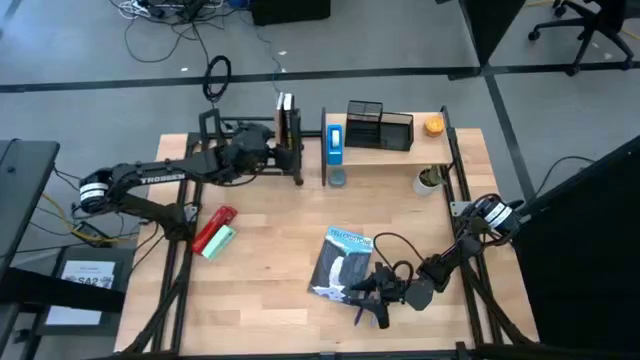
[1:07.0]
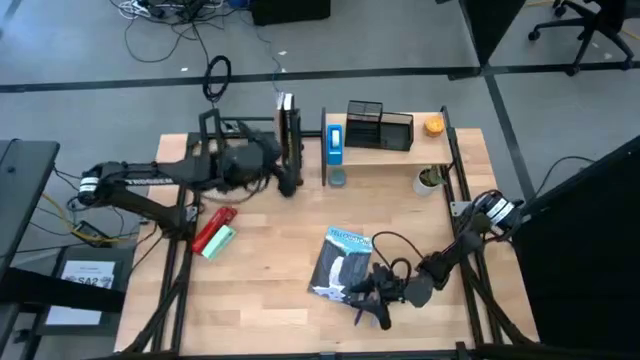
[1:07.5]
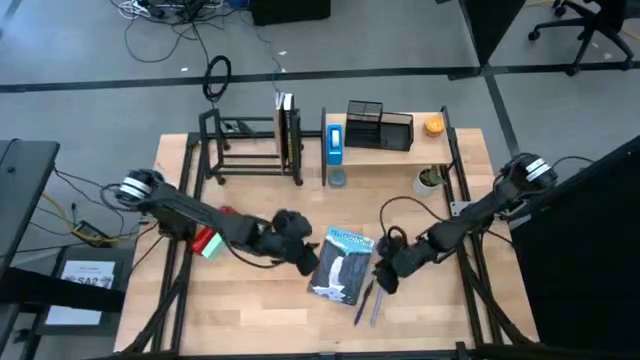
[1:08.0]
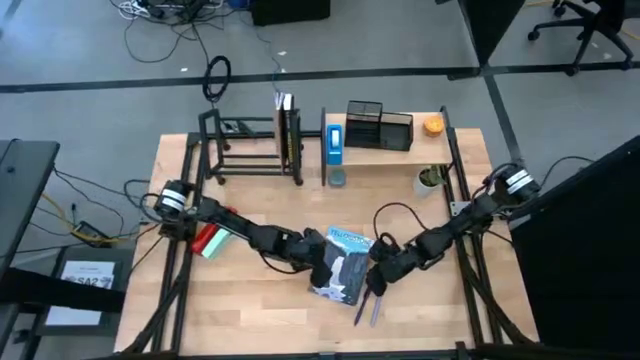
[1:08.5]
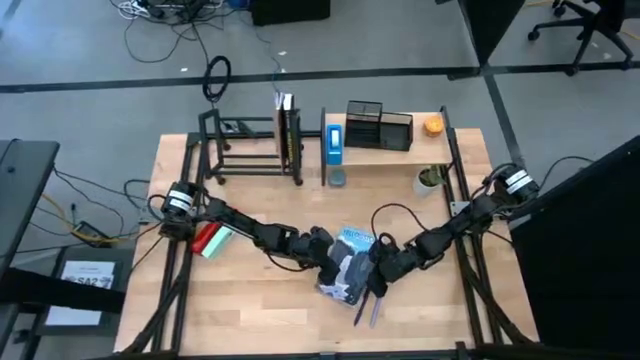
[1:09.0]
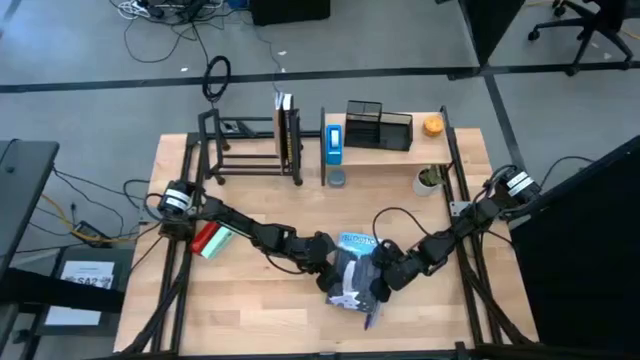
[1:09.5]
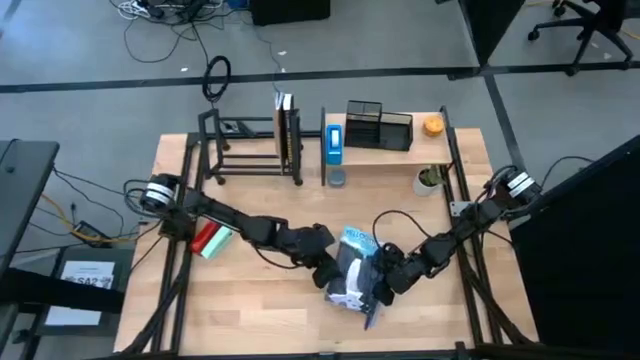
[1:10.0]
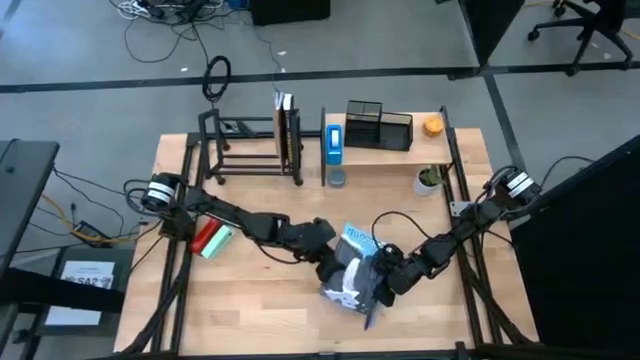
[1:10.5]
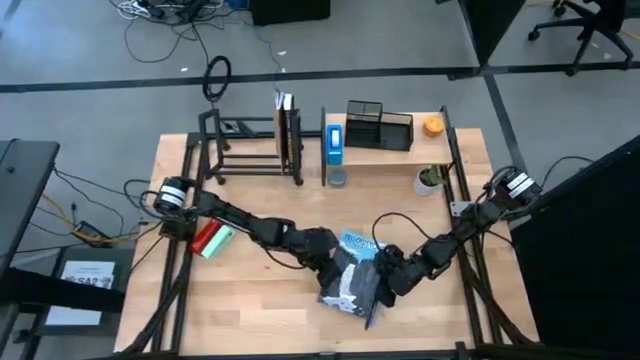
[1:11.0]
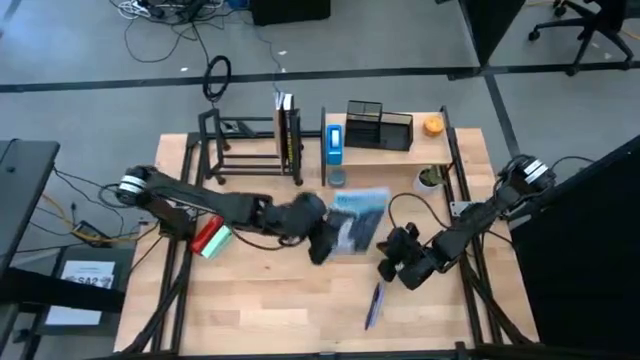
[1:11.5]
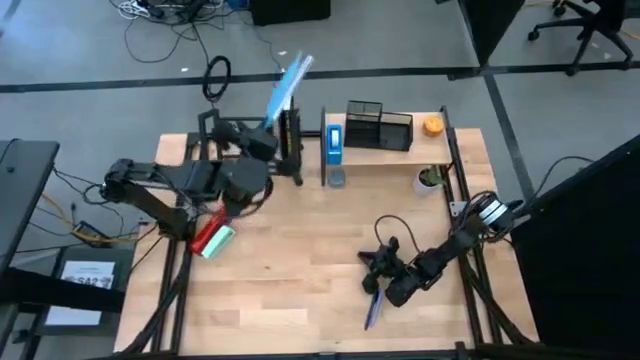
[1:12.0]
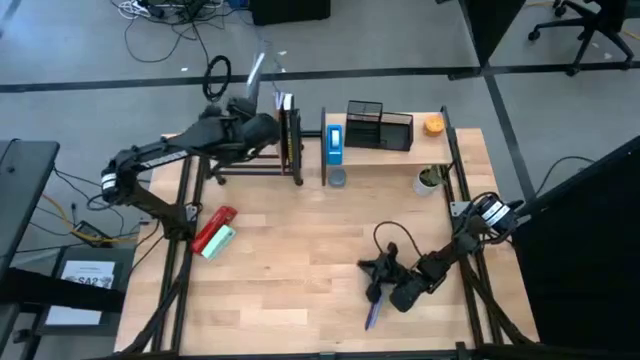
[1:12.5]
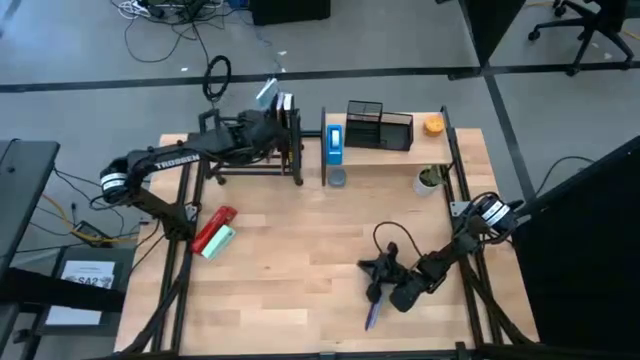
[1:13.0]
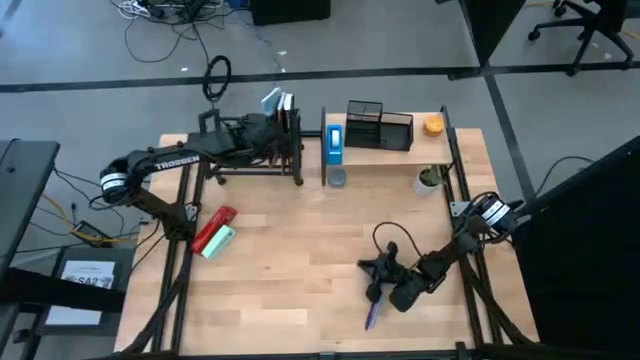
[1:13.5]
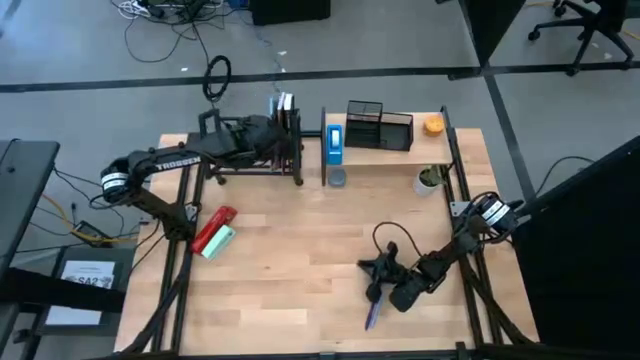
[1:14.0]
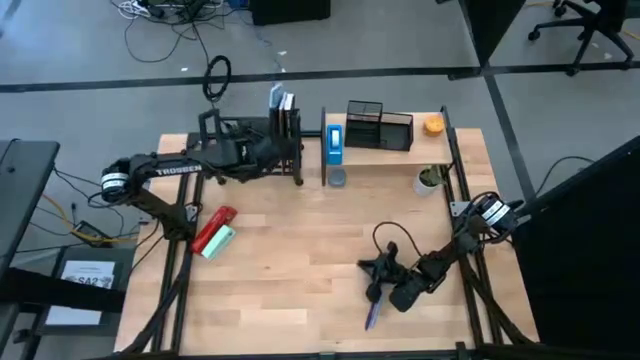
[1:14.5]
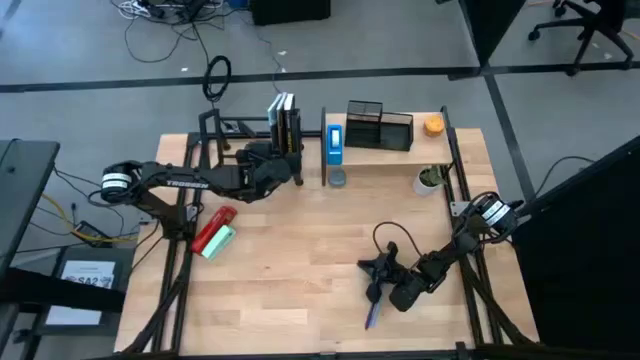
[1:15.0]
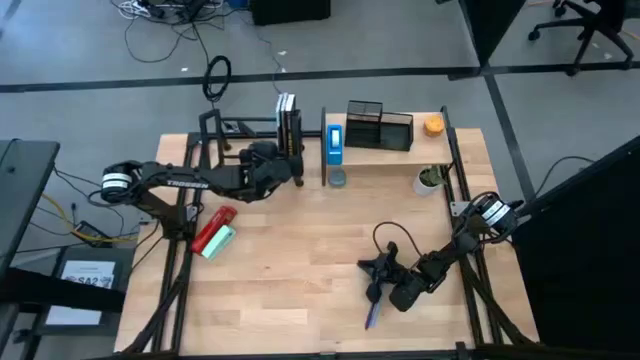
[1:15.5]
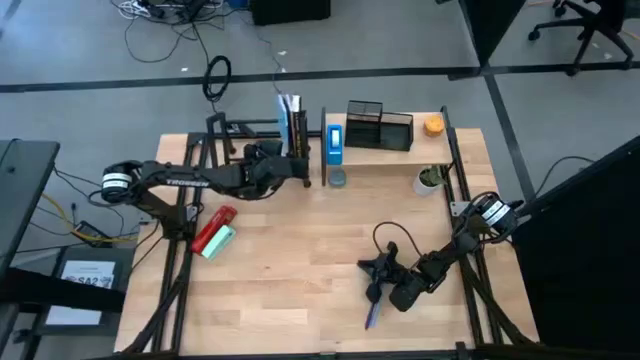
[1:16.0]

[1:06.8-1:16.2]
Task: Stock shelves
Put the blue book on the book organizer

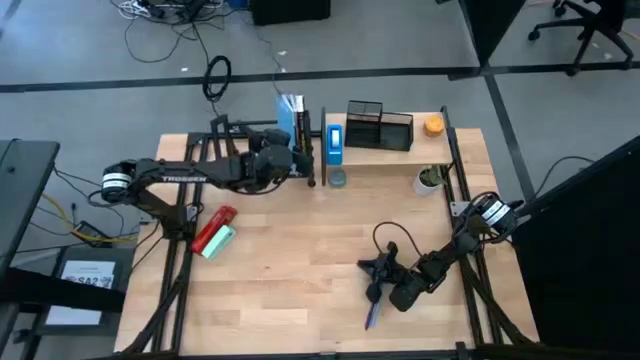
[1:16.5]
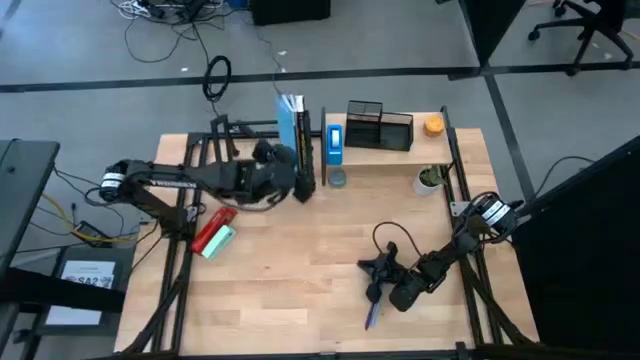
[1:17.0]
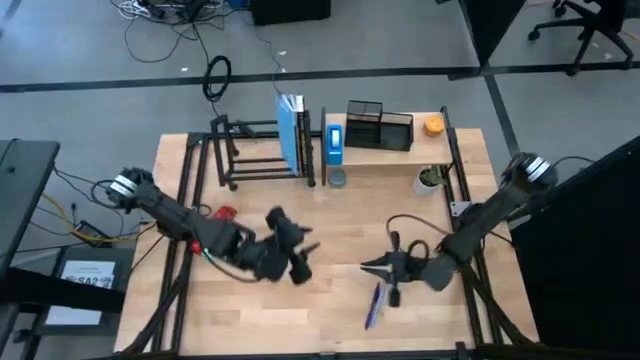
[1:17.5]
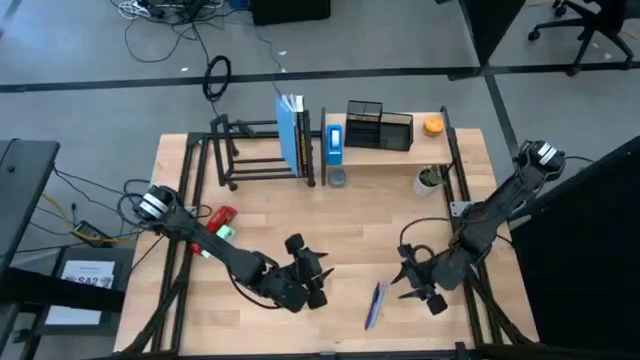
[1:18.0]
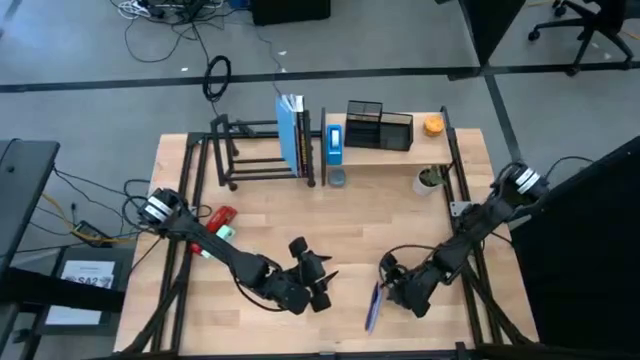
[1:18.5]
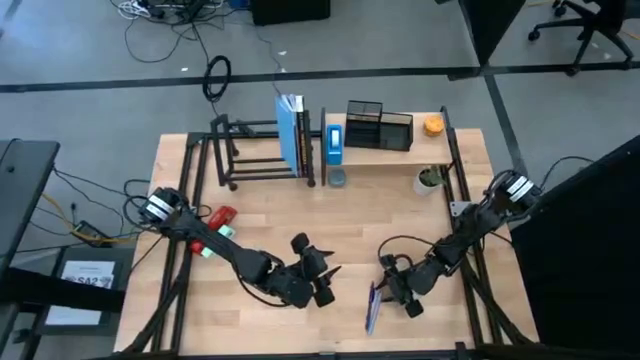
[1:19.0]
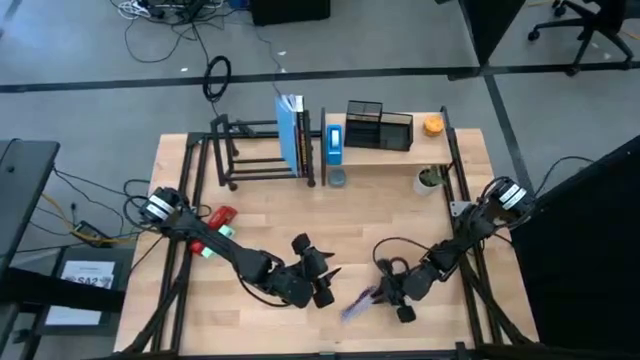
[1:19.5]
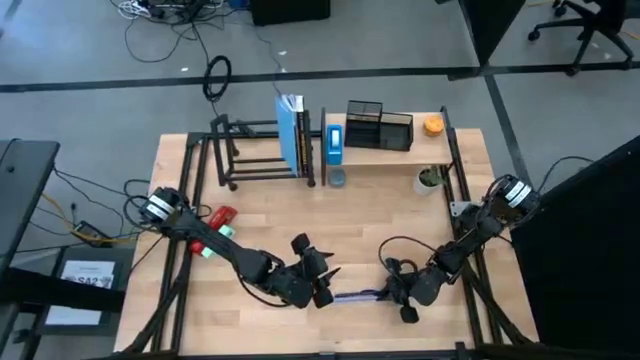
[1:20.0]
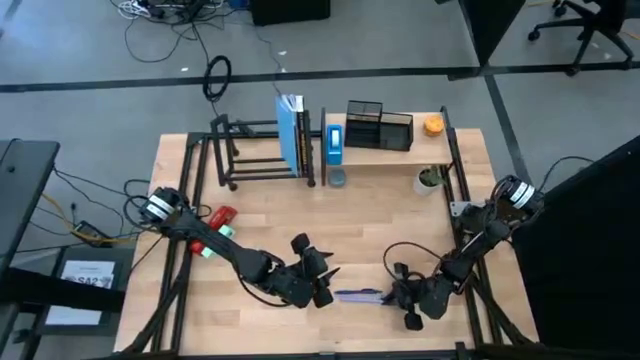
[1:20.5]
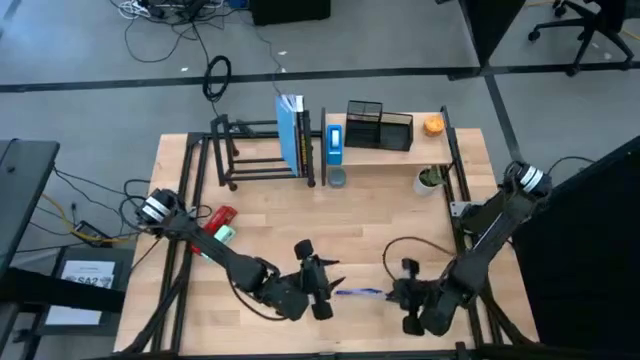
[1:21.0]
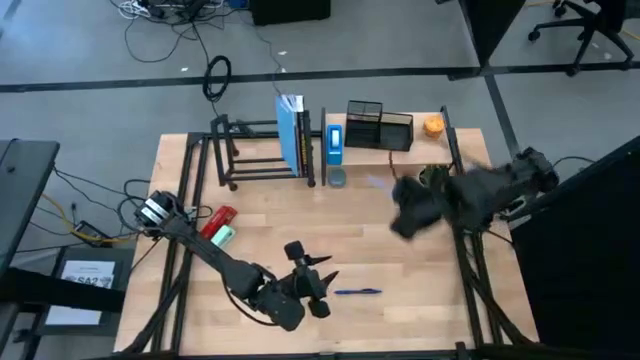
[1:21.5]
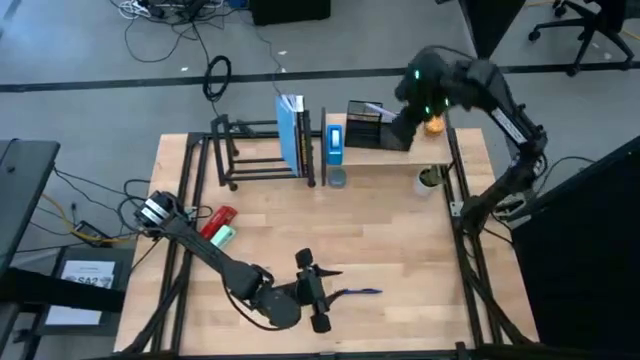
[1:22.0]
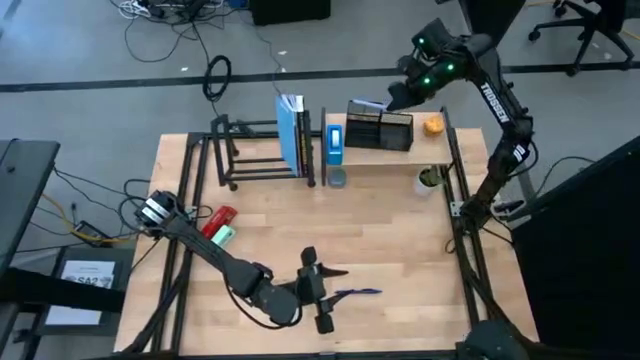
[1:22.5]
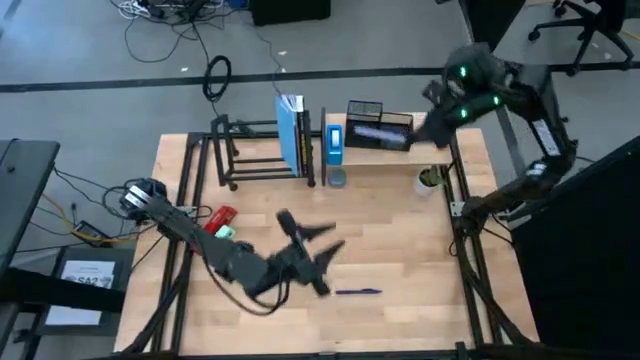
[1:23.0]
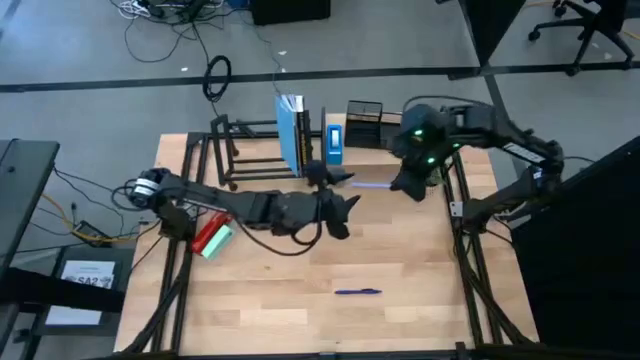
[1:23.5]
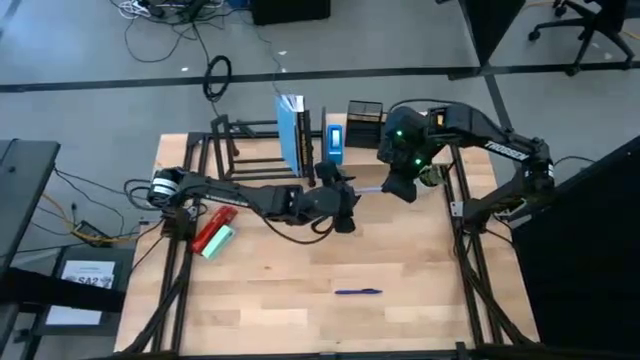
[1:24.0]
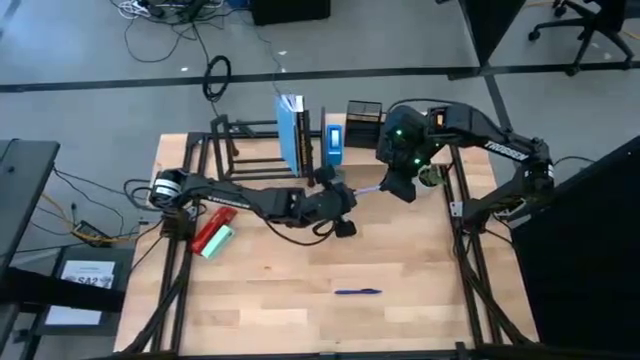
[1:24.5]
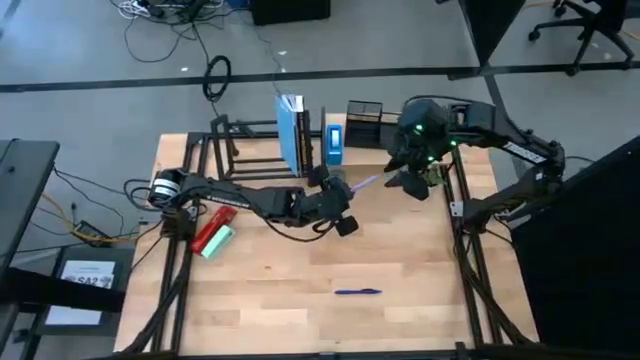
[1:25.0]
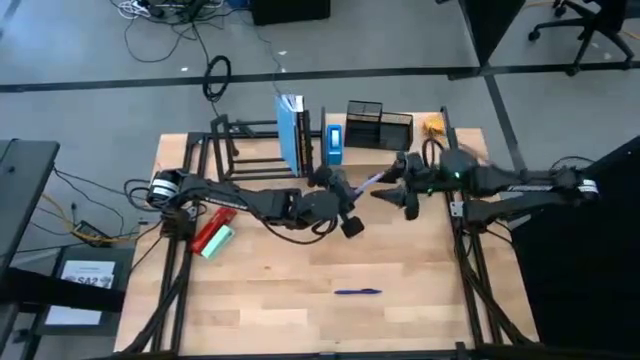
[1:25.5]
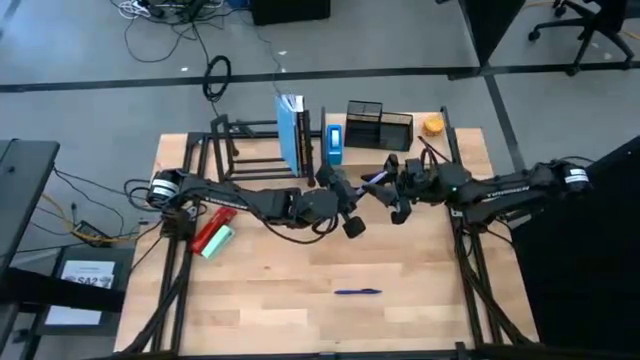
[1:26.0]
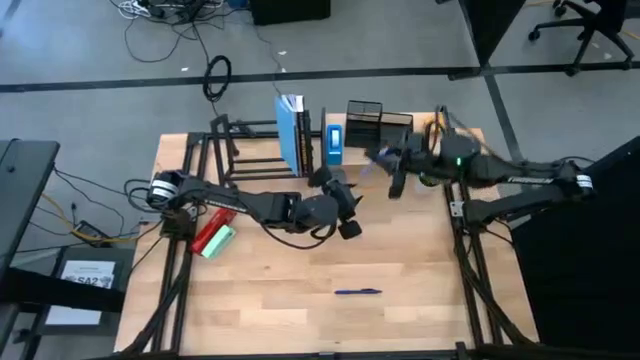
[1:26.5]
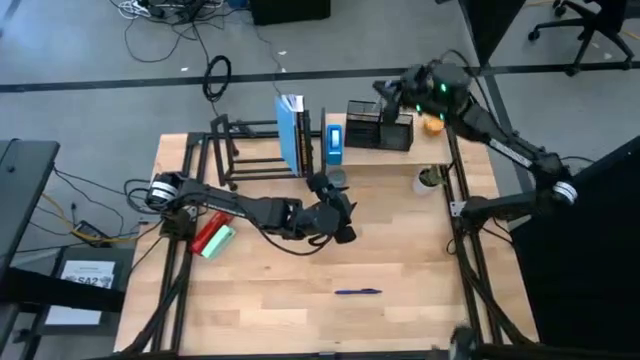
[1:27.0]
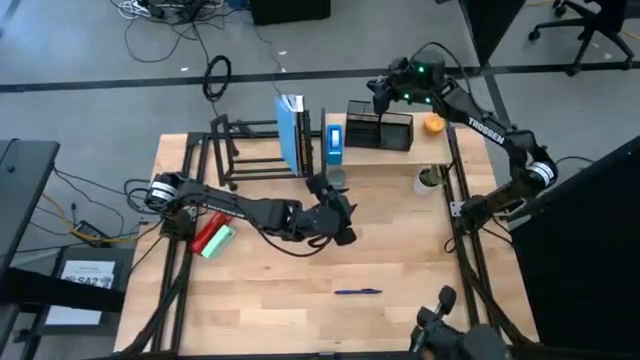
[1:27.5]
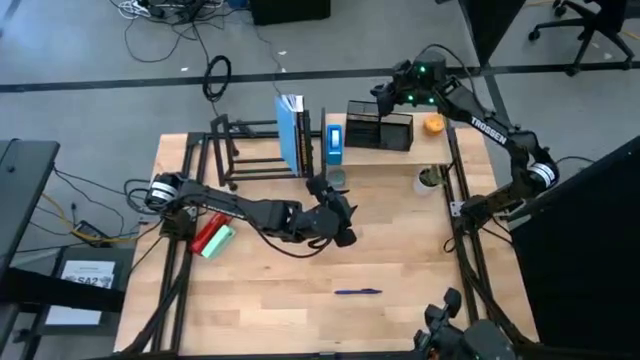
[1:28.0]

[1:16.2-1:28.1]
Put the purple ball pen into the pen organizer on the shelf
